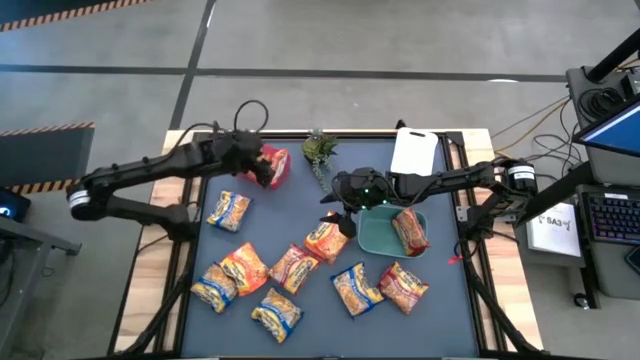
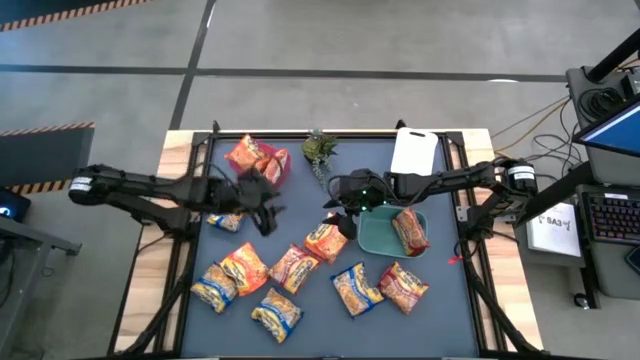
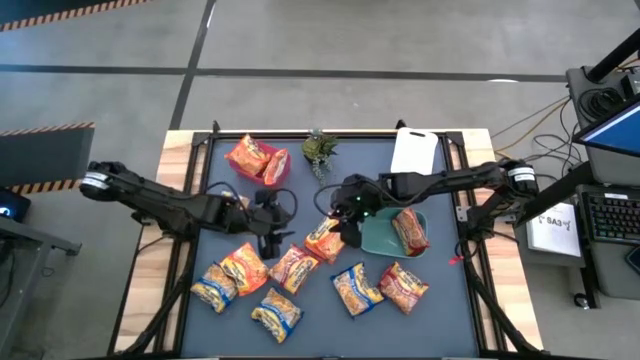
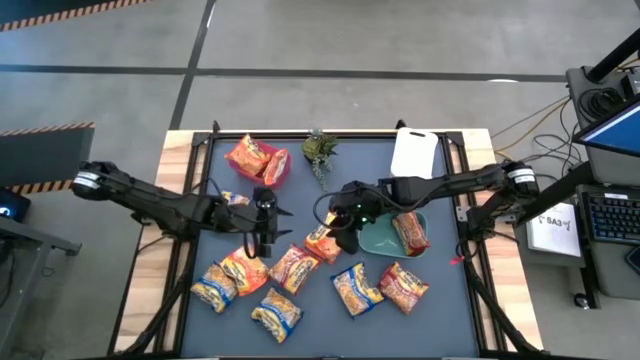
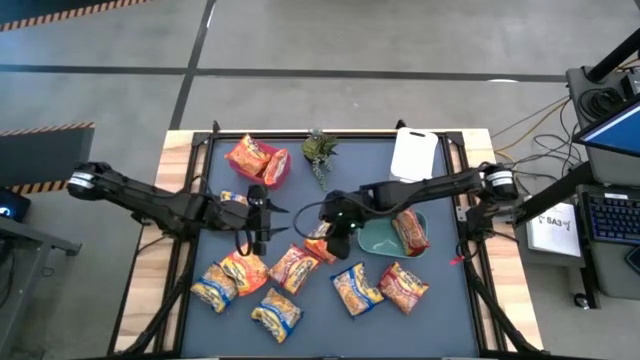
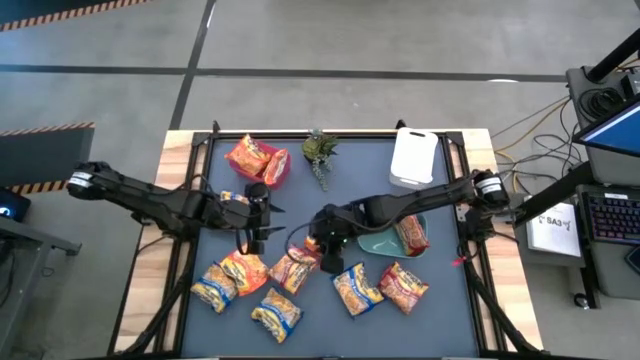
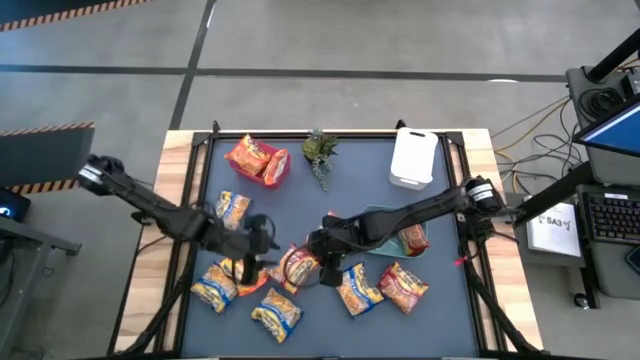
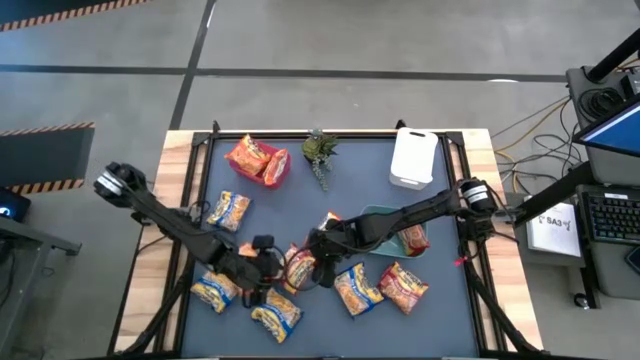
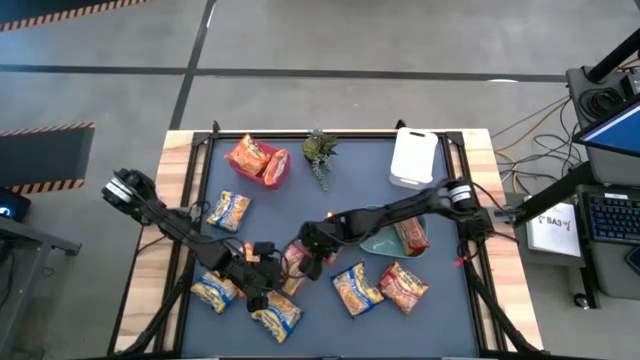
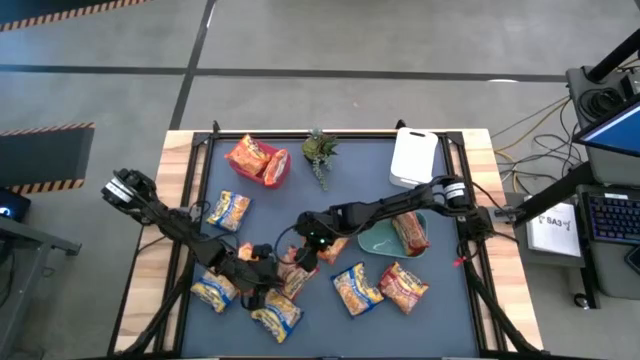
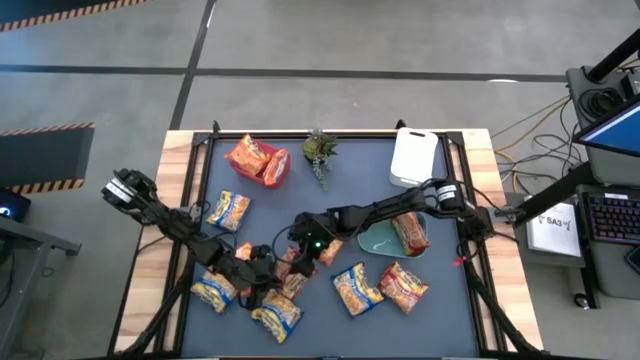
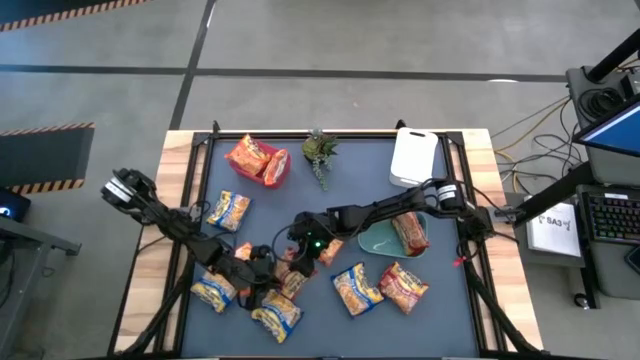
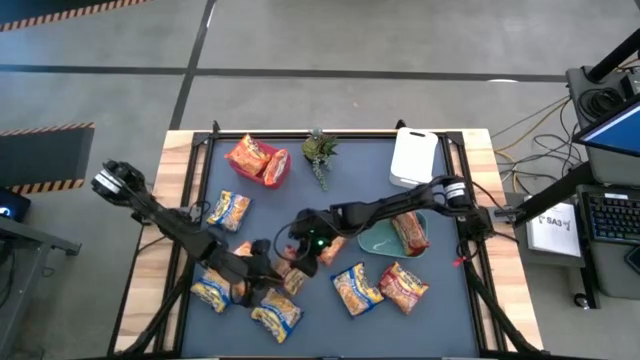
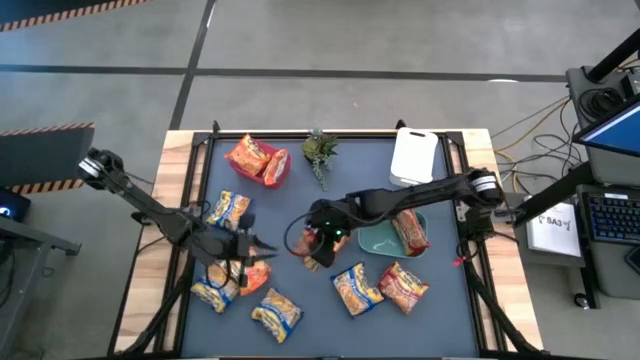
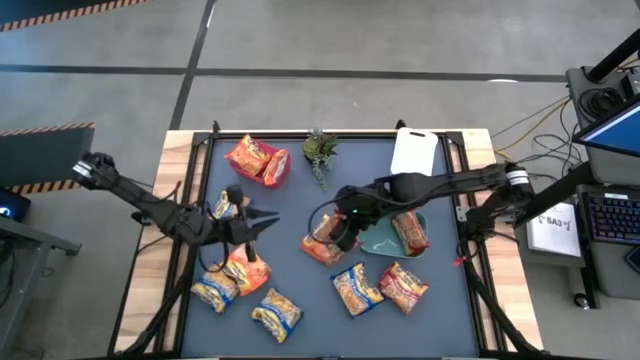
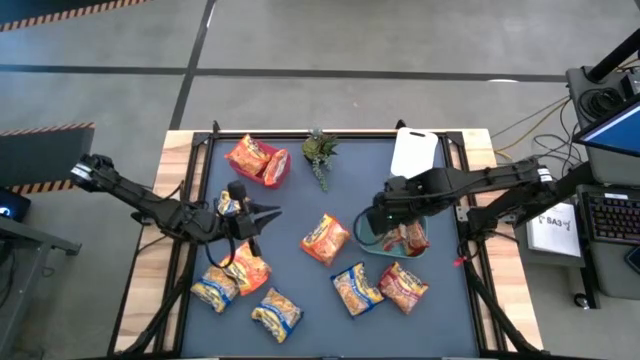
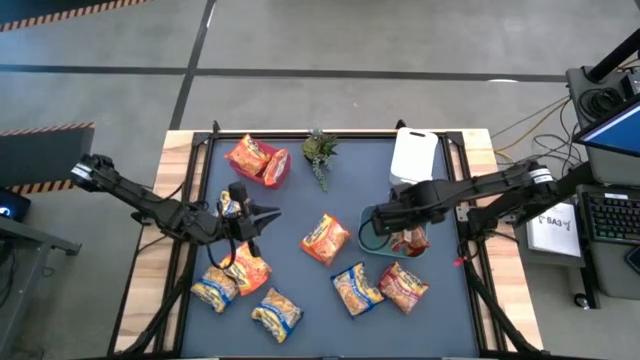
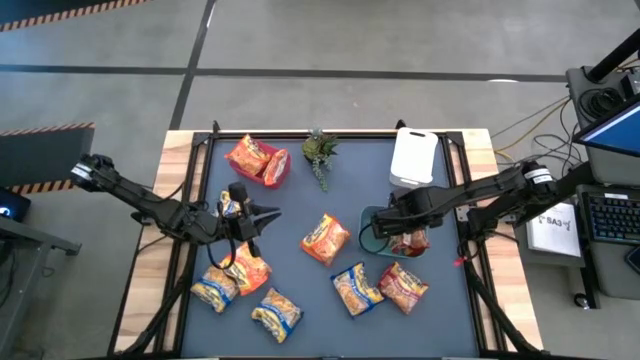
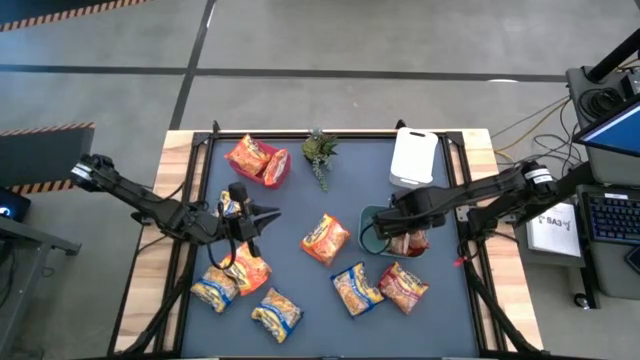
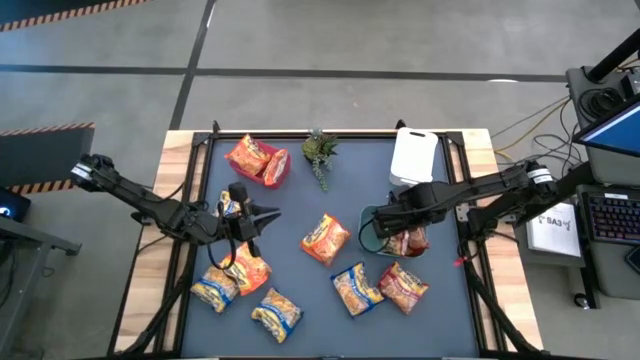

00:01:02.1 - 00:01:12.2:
Task: Sort Maruchan noodles
Put the red noodle pack into the green bin

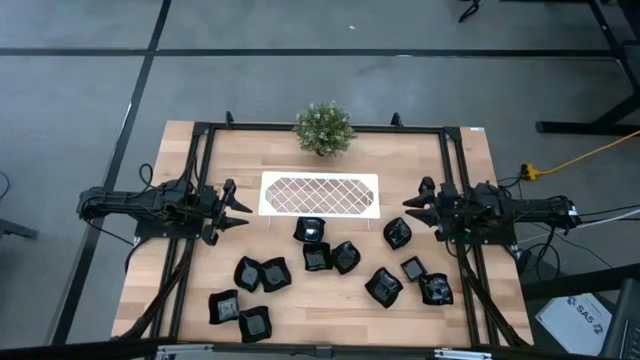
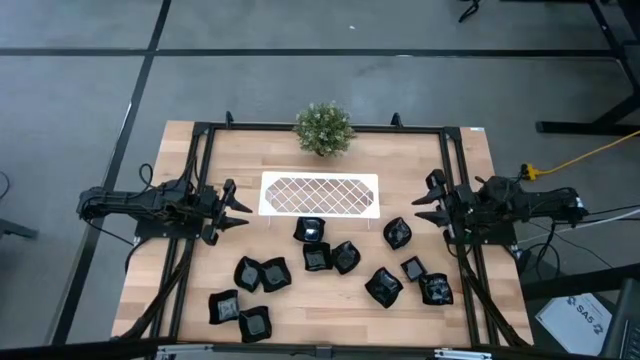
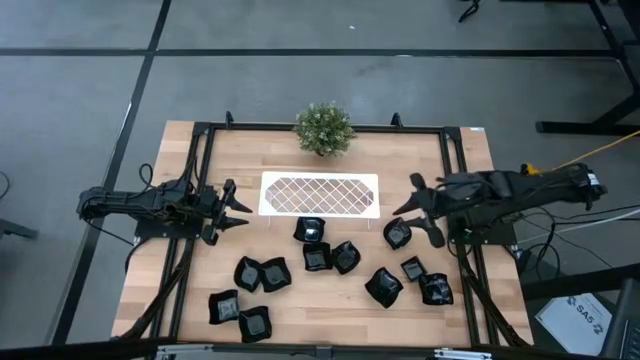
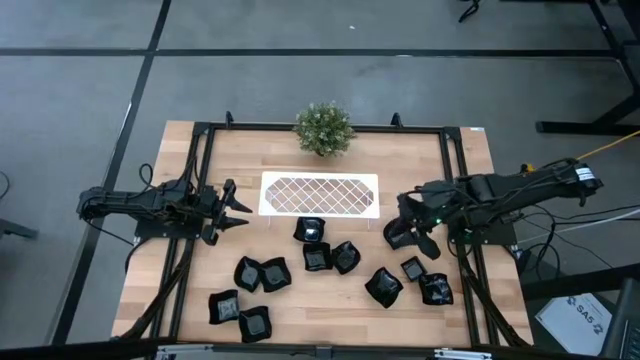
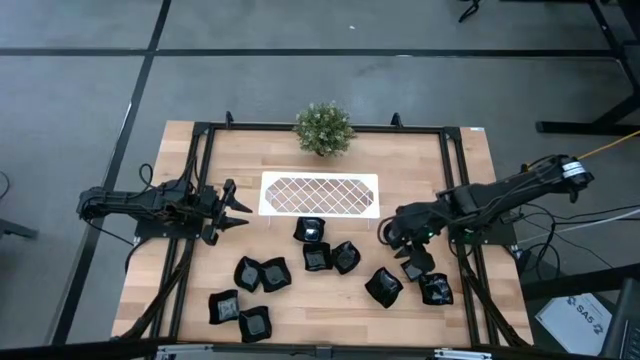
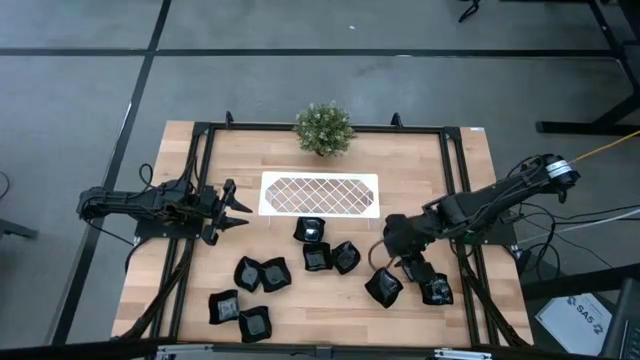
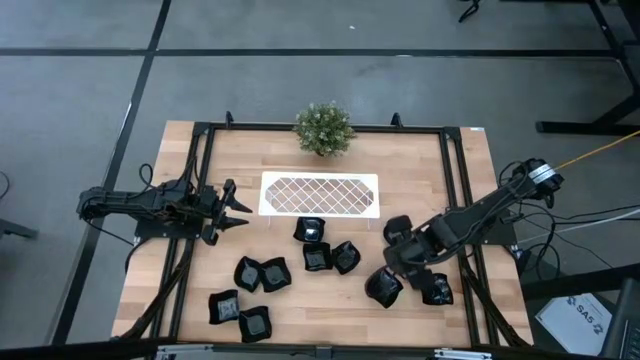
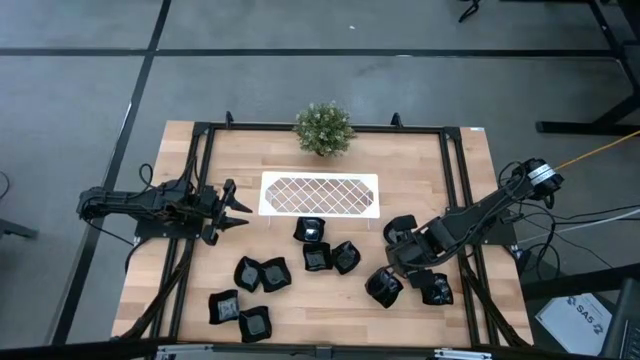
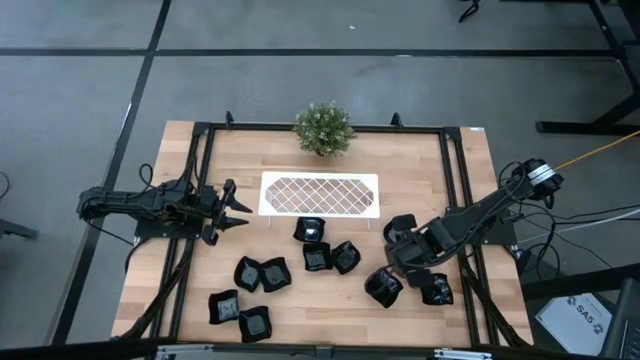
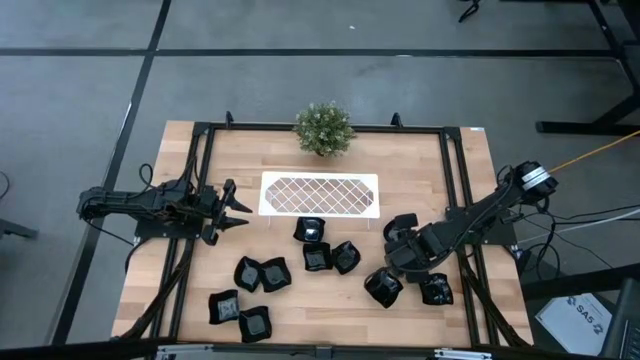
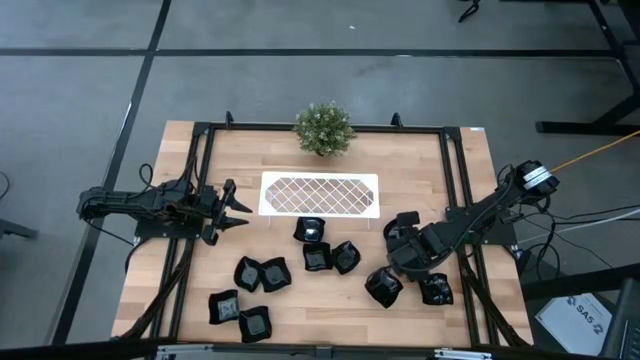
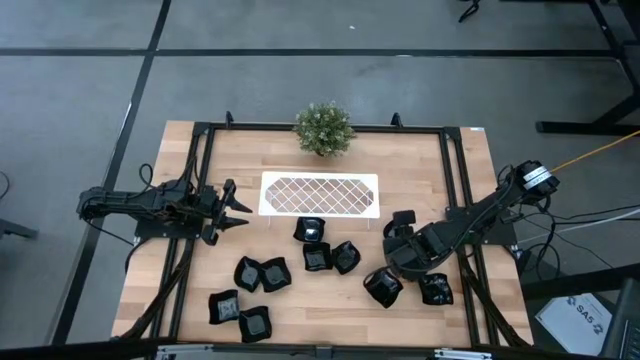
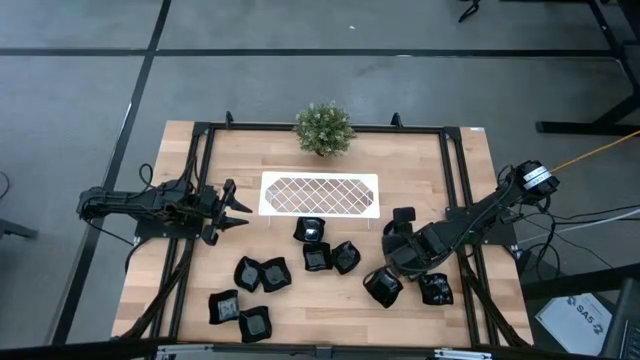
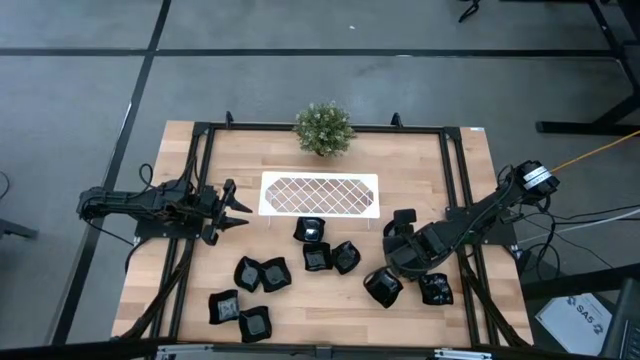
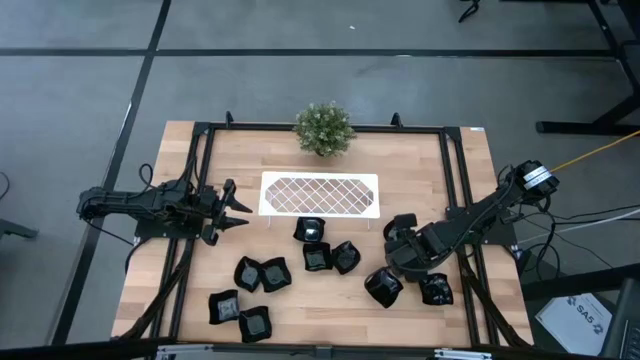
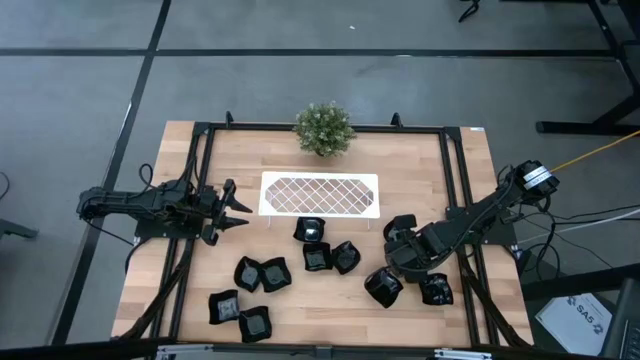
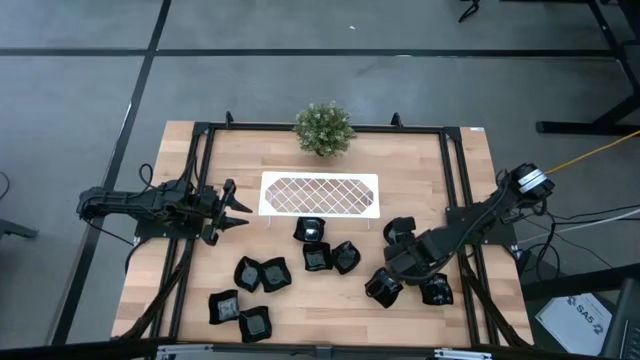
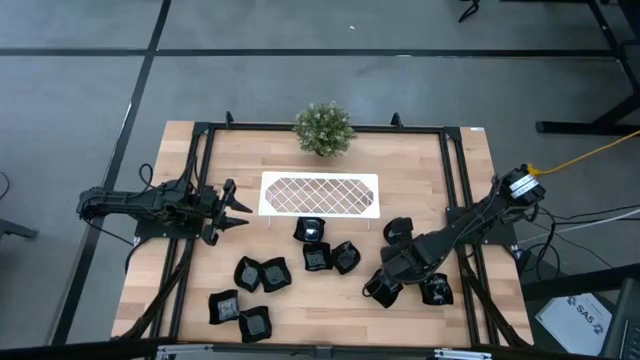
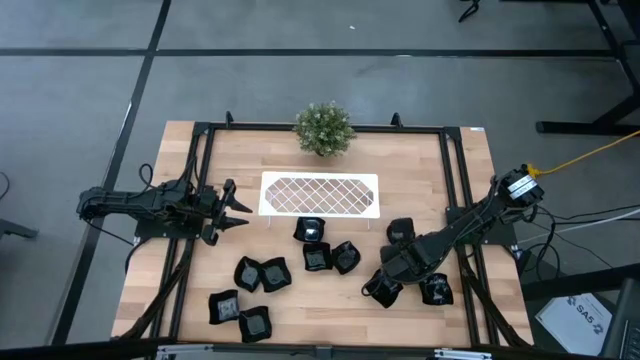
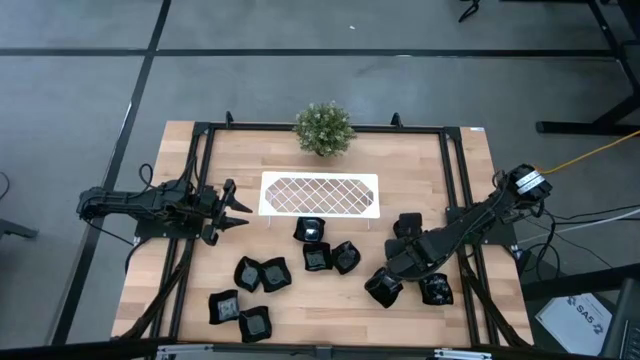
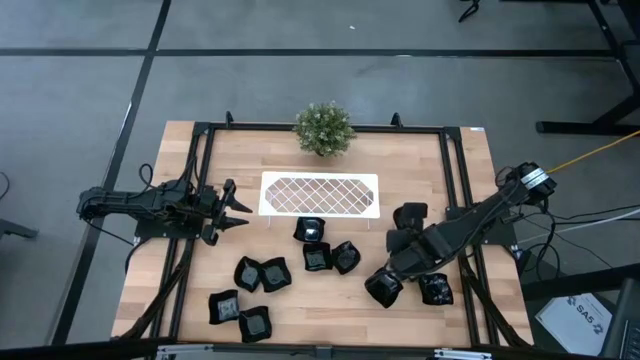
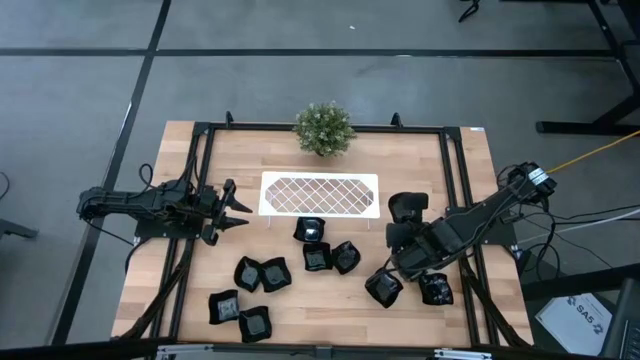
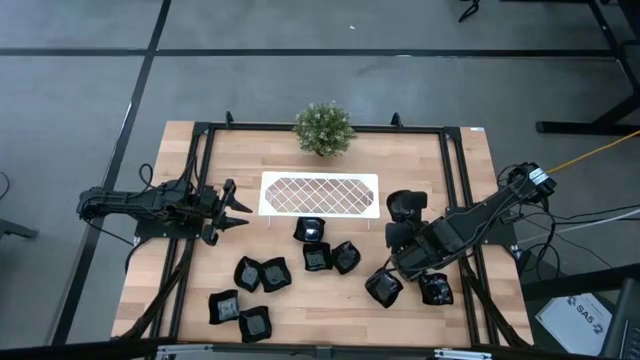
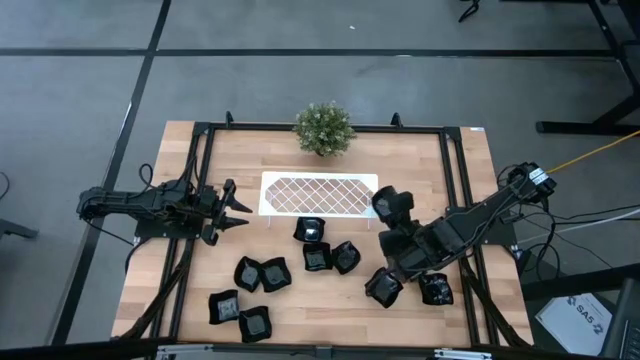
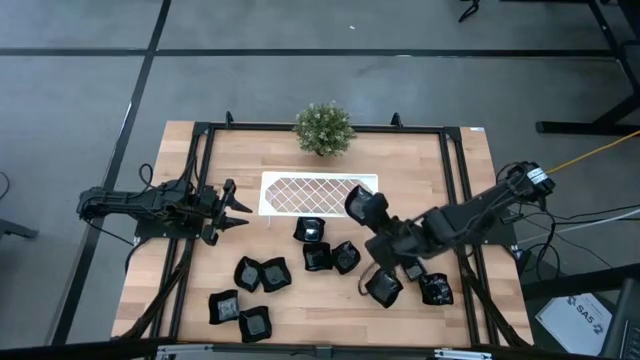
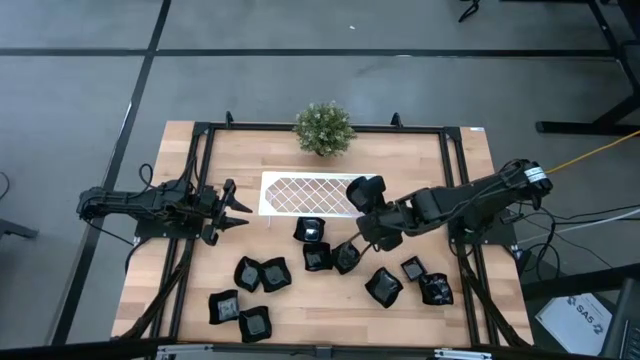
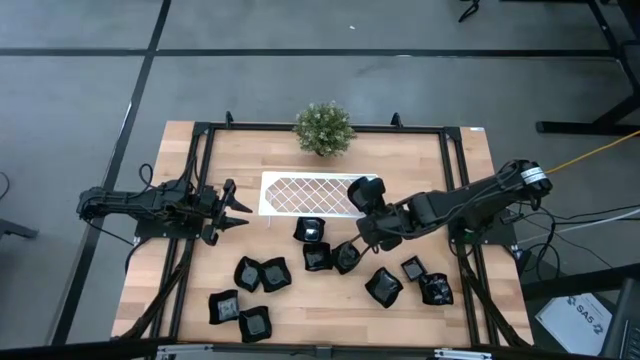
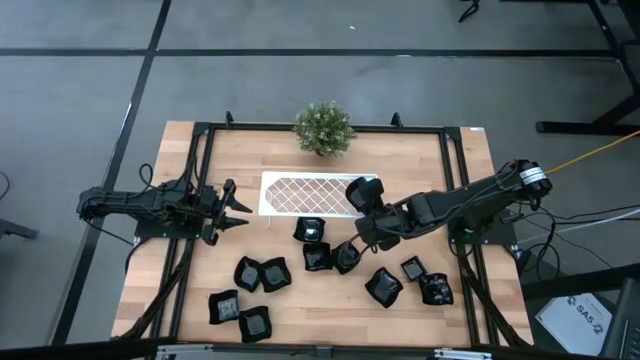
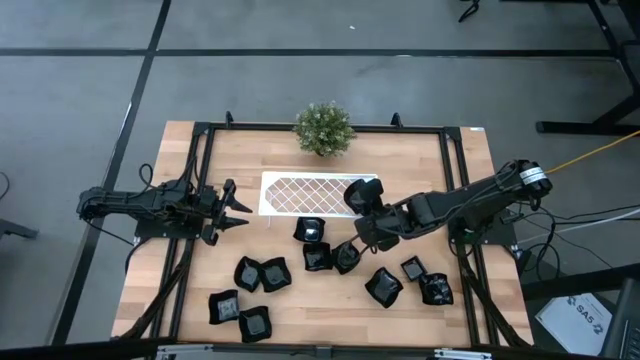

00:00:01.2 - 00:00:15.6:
Task: Pick & Place Mini shaped plates
Put the black leaf-shaped plate on the shelf
